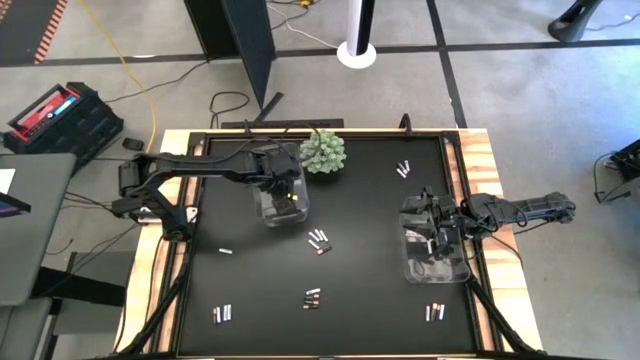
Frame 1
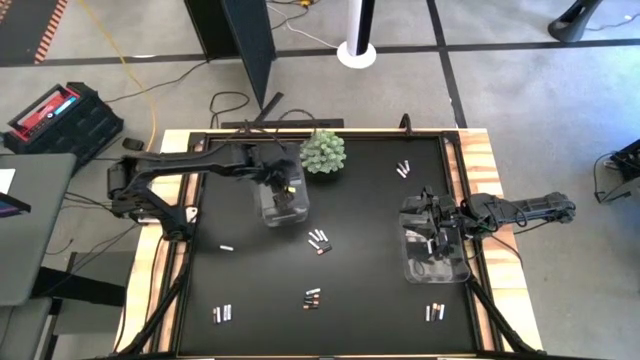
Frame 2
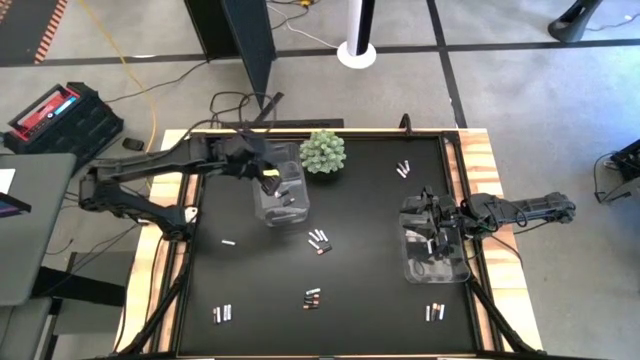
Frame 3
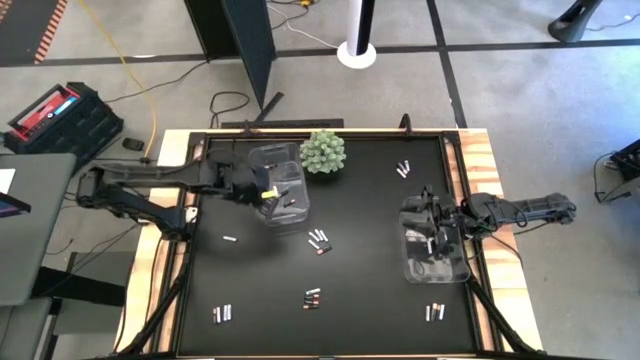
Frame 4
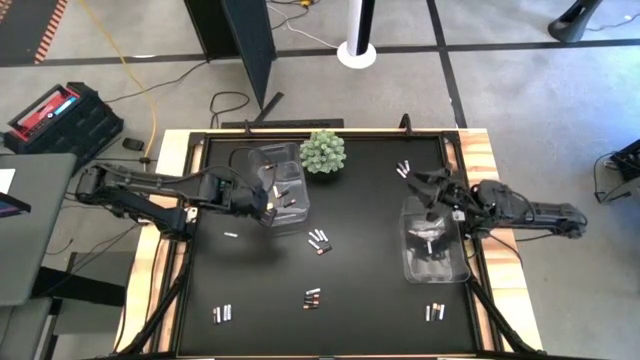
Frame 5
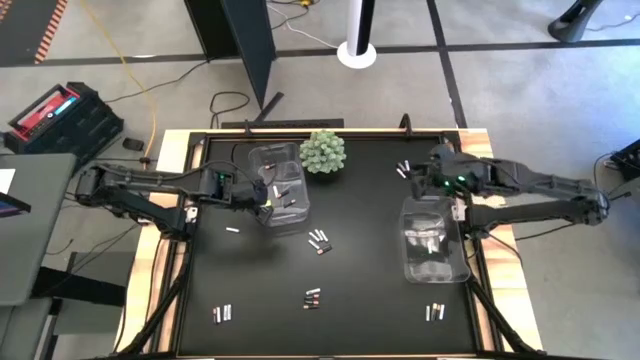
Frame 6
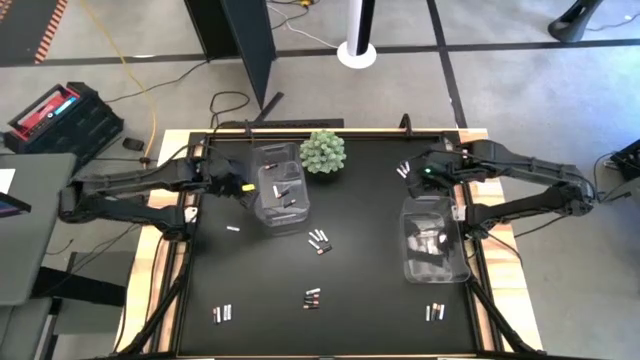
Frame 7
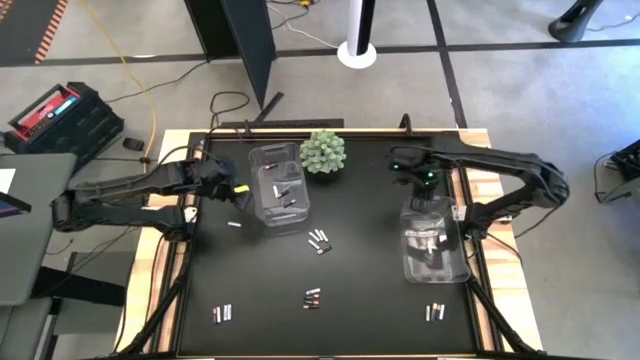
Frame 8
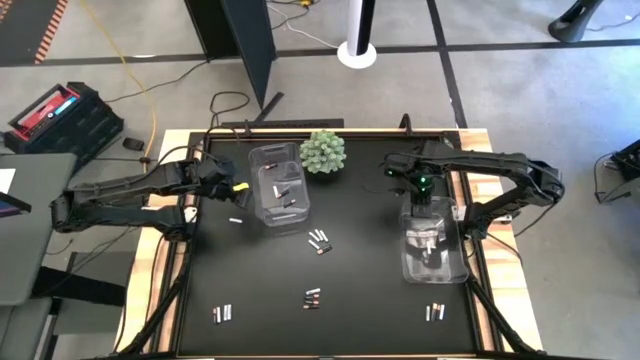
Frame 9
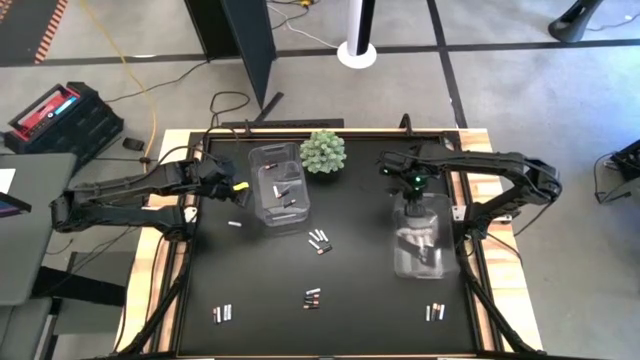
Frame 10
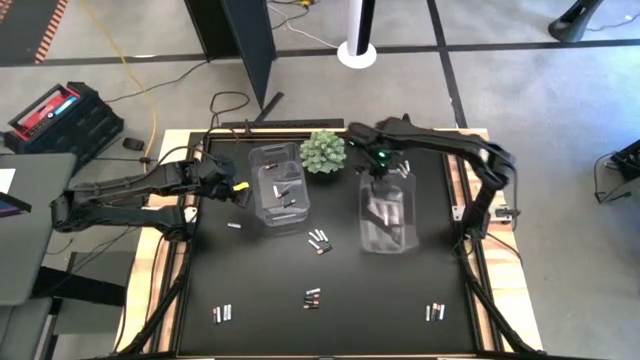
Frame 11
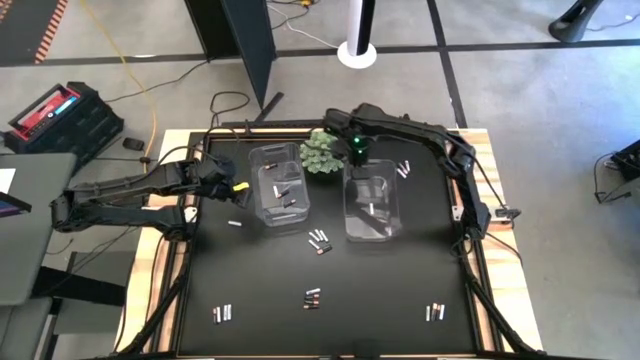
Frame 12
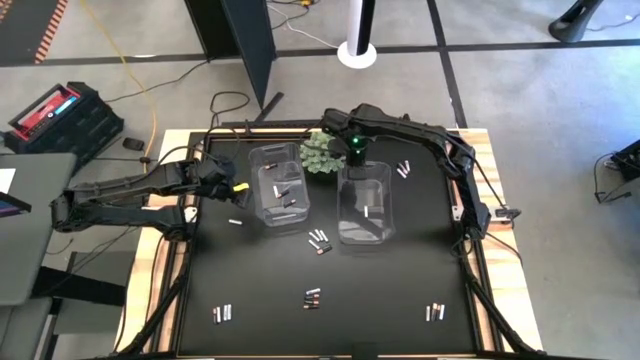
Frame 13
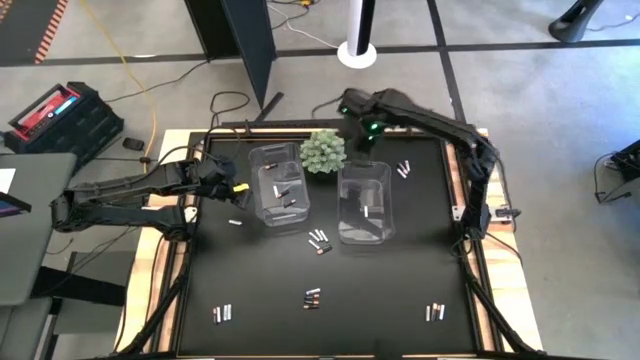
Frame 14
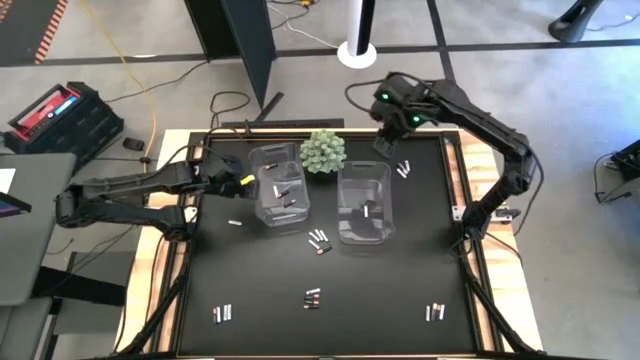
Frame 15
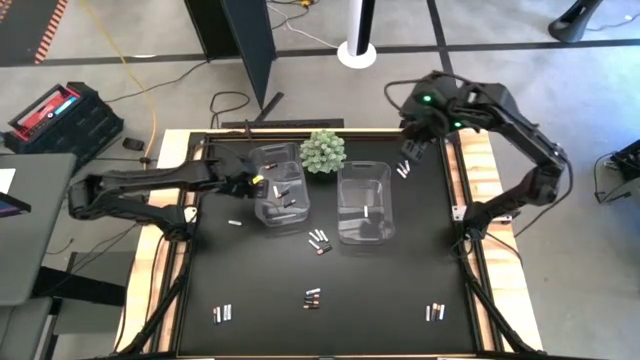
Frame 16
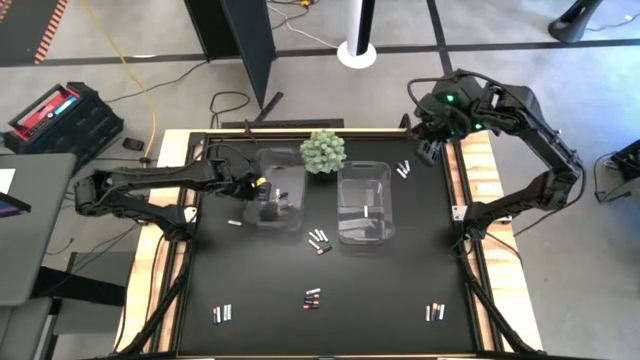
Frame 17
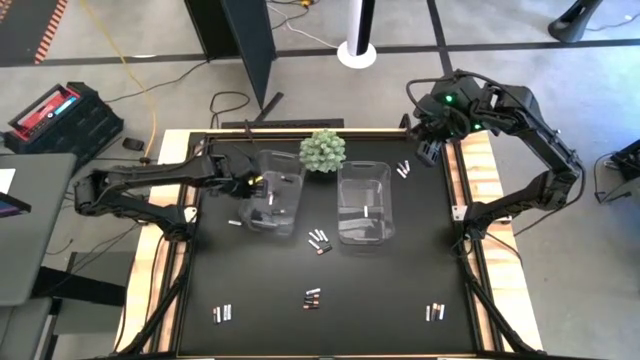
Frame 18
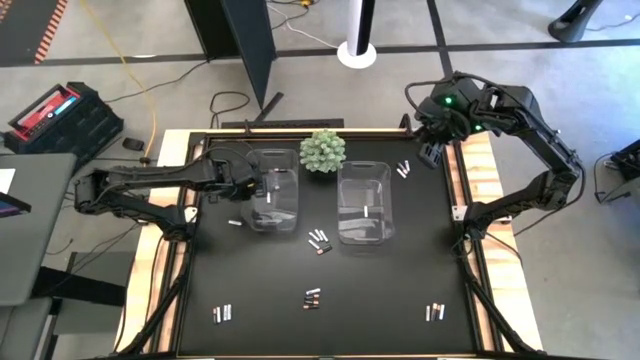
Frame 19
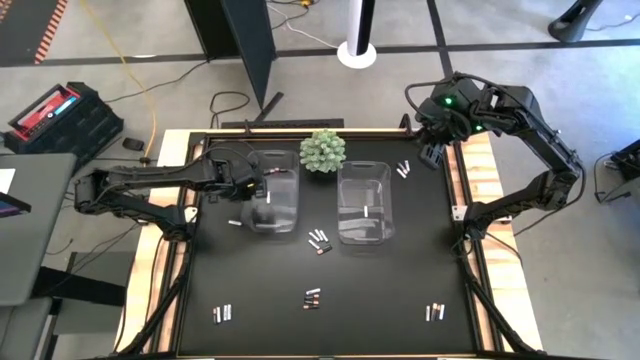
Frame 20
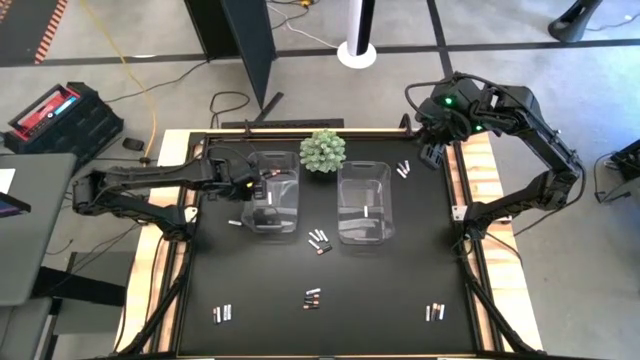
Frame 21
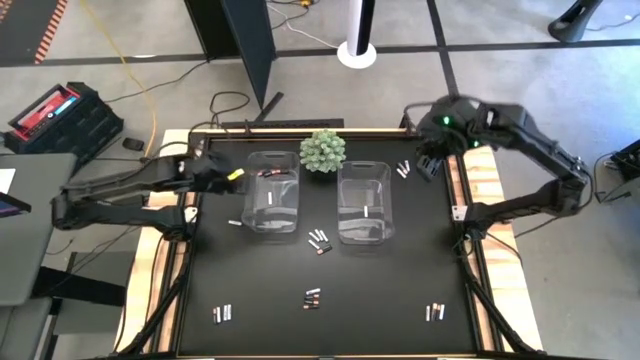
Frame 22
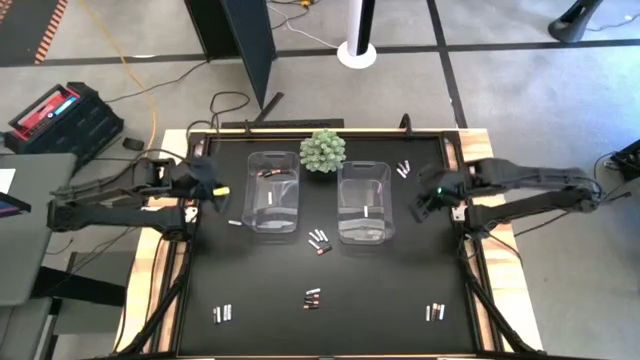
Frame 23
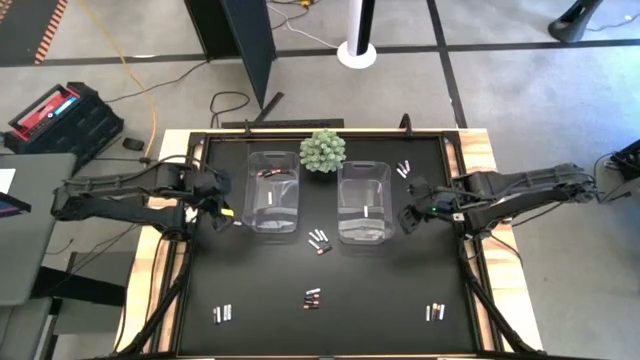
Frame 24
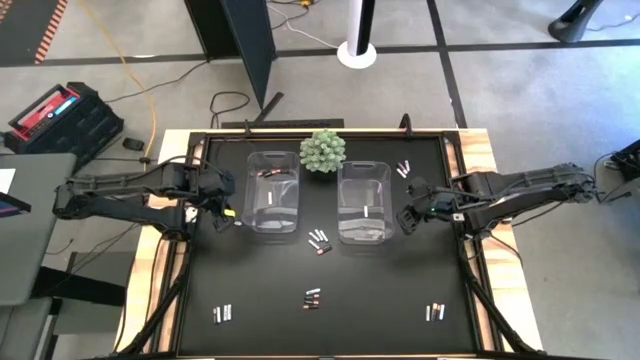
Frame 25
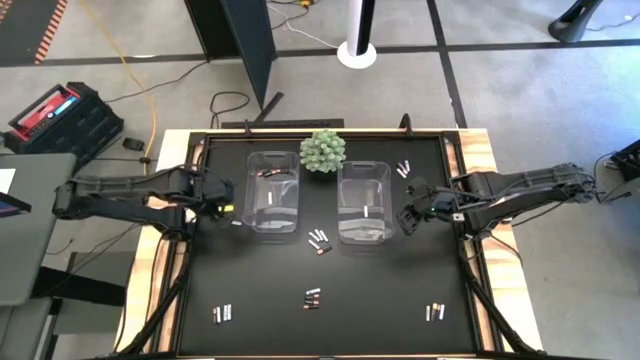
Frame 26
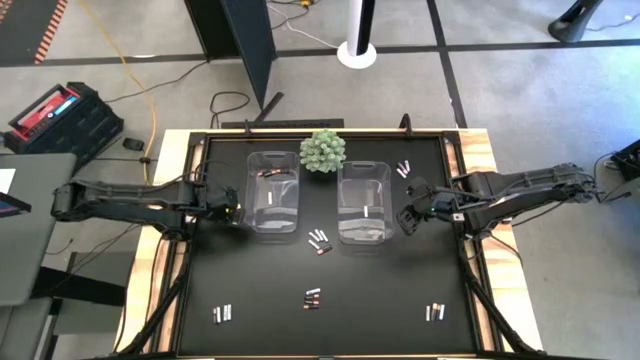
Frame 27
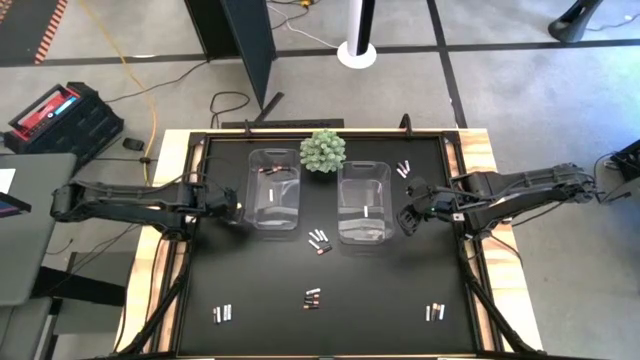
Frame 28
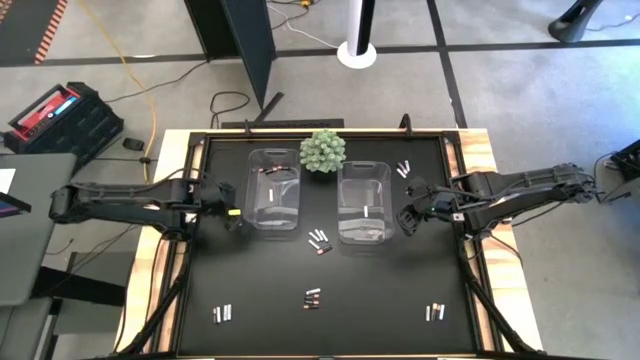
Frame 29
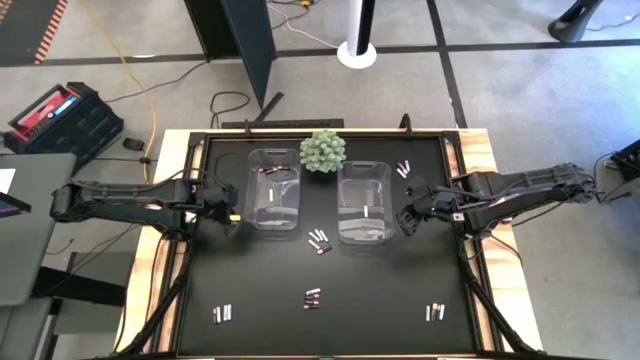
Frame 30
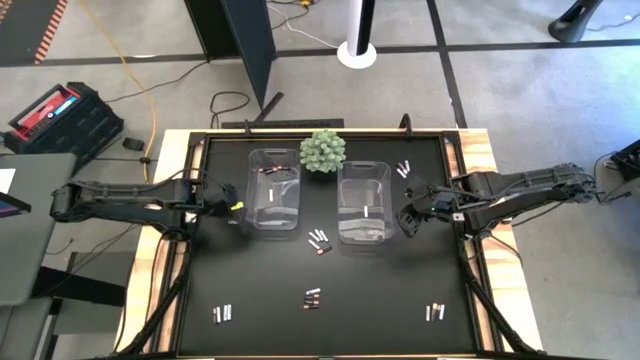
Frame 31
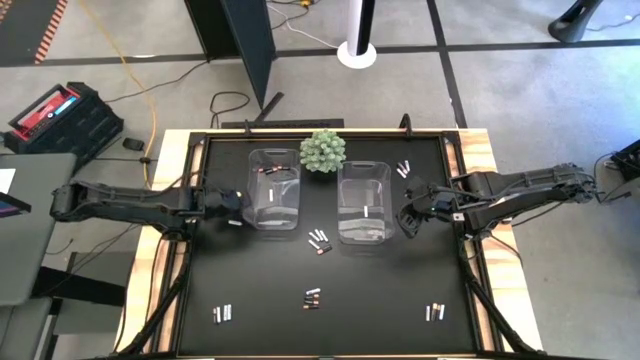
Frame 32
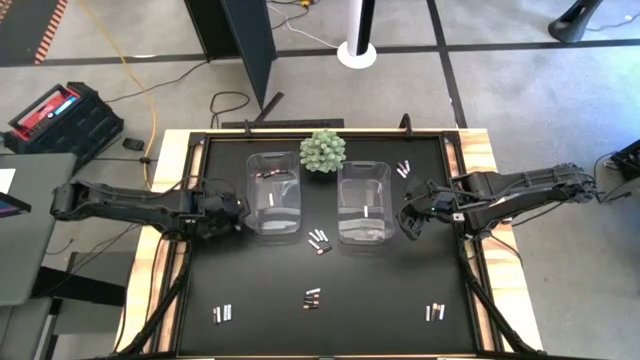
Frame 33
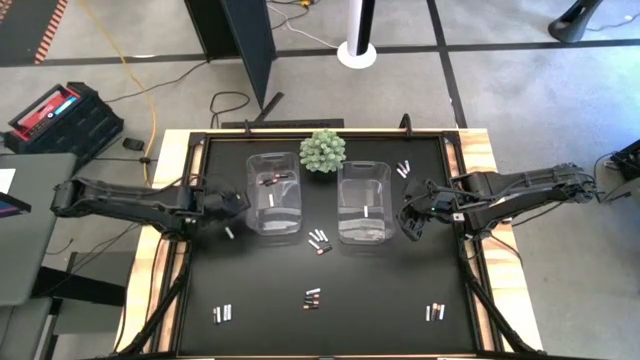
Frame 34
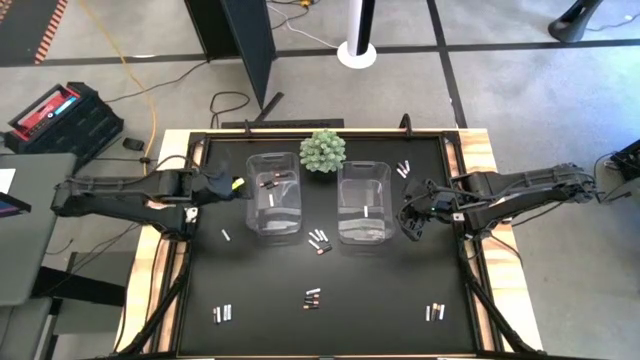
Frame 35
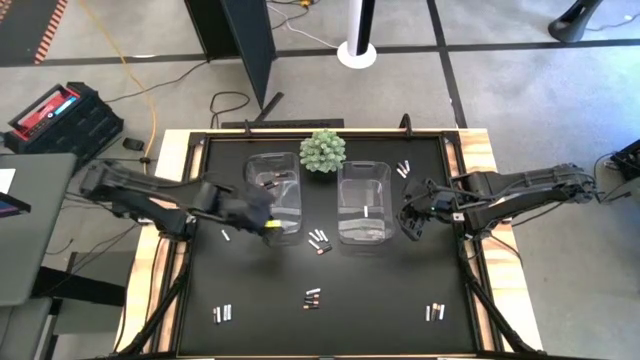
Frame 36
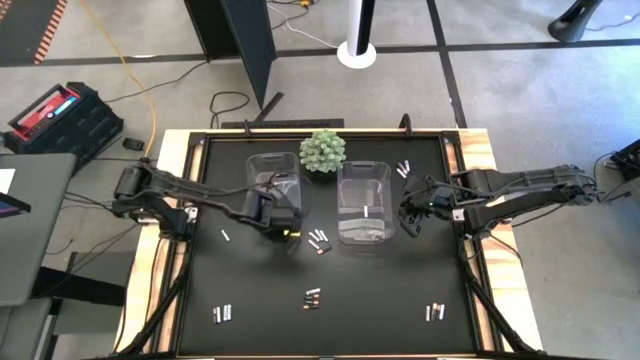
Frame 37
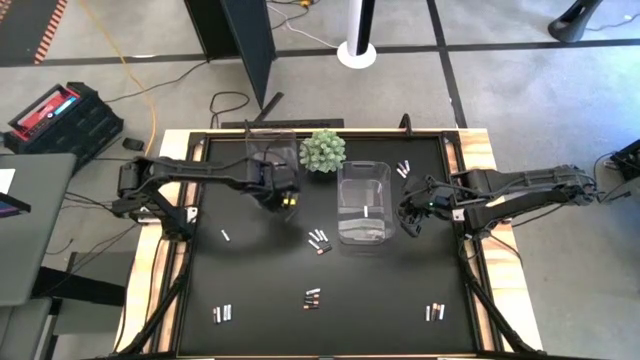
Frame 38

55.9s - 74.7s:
Task: Sort batteries
Adjust the transparent bins

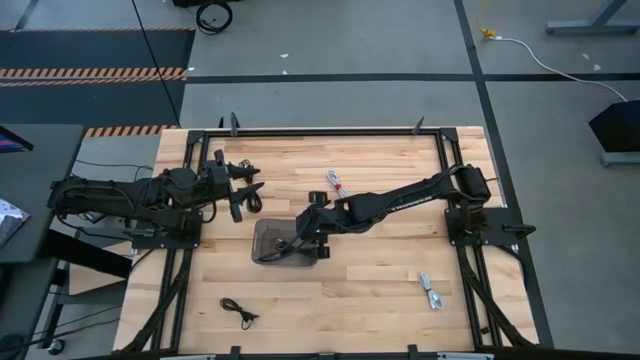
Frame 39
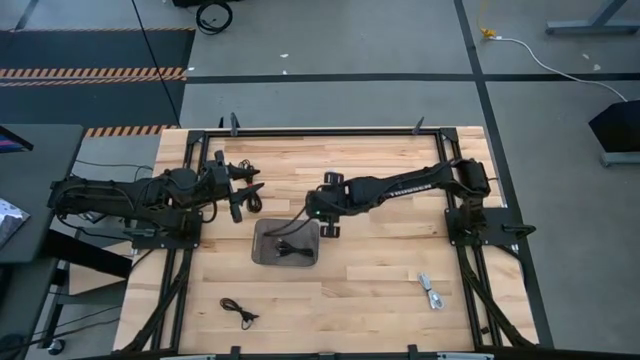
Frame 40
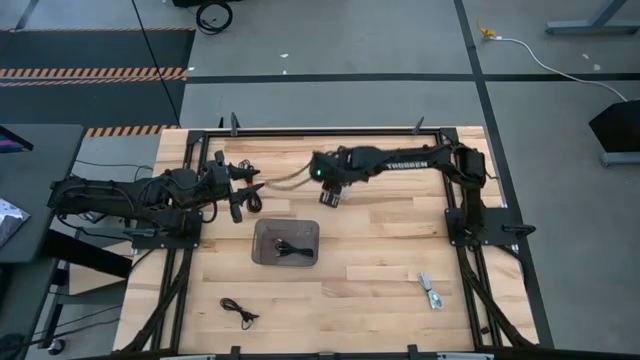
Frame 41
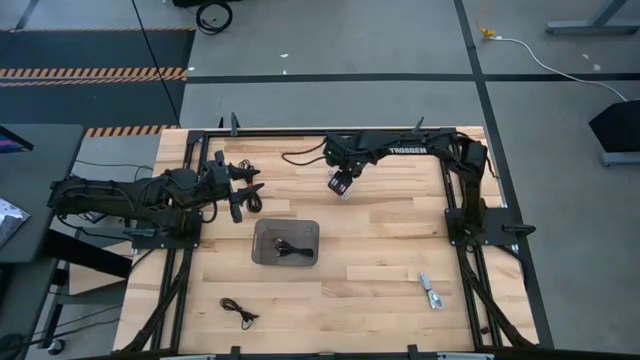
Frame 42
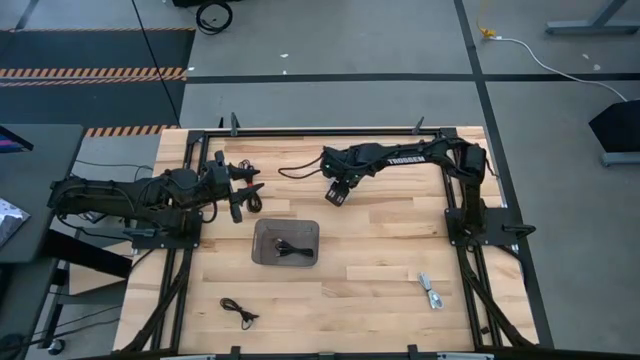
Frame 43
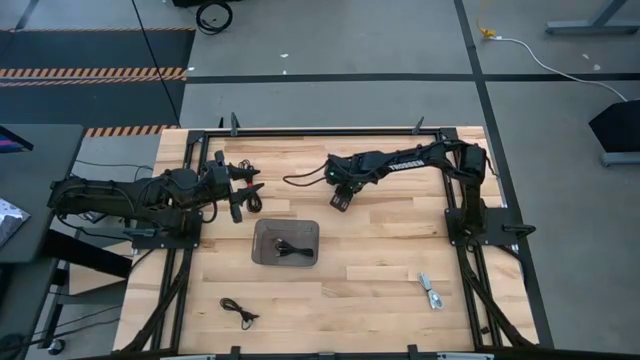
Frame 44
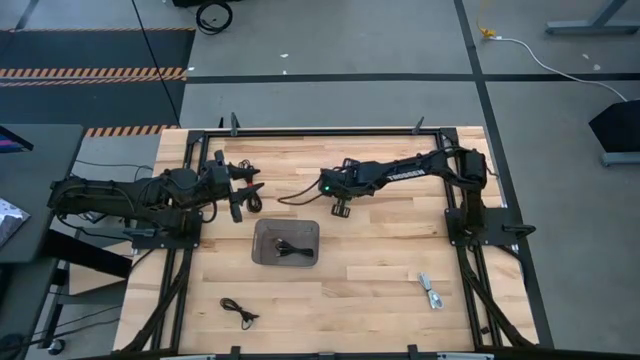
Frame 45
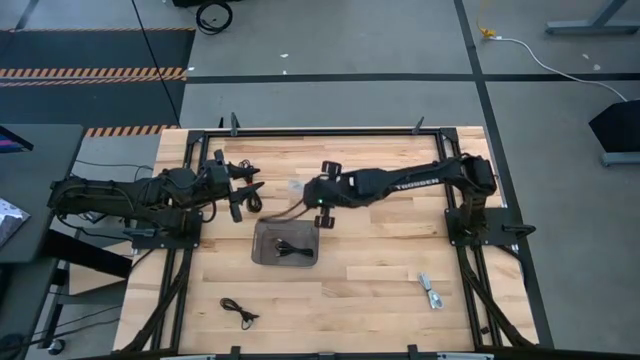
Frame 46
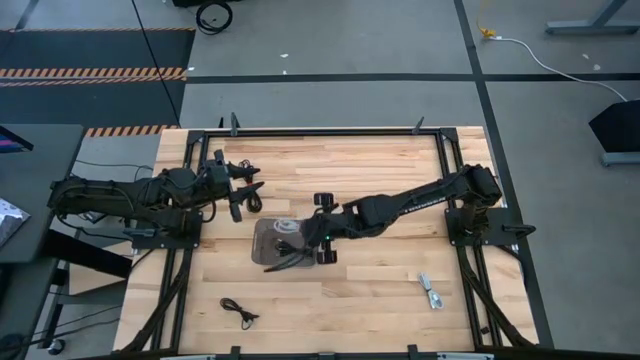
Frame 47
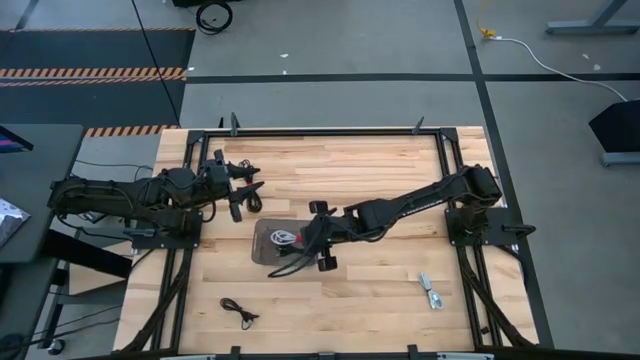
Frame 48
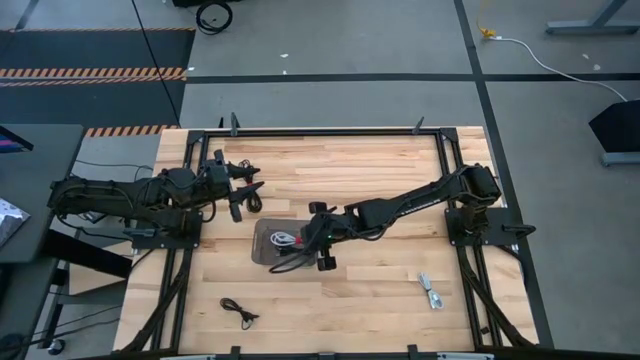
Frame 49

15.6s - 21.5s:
Task: Pick and place USB-C Cables
Put the top white USB cable into the black bin
